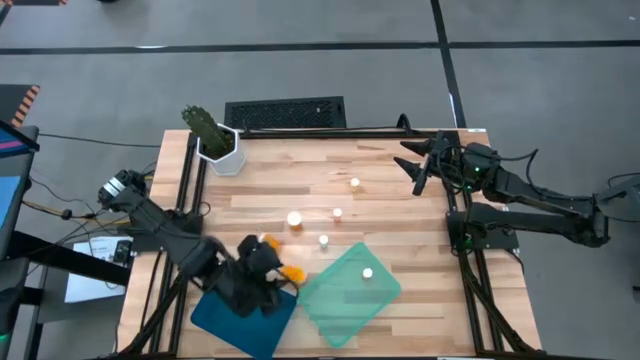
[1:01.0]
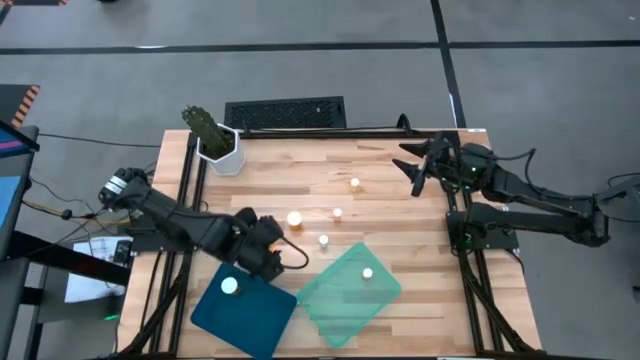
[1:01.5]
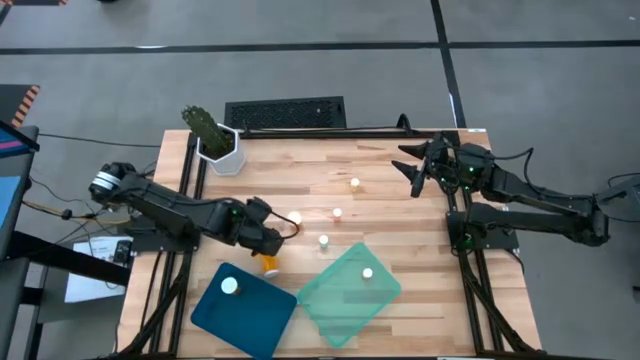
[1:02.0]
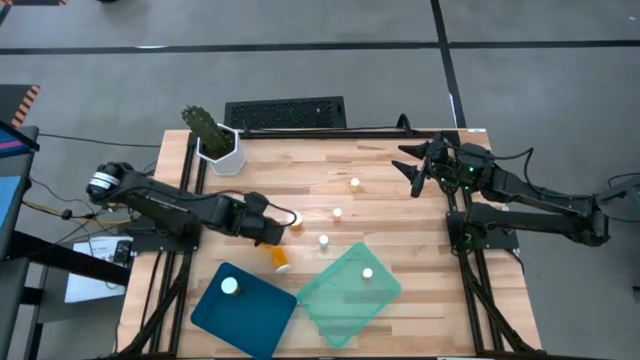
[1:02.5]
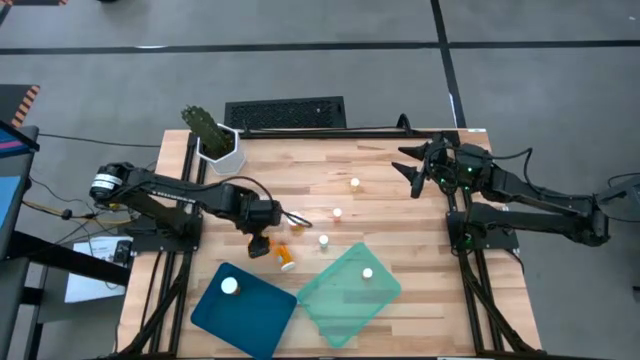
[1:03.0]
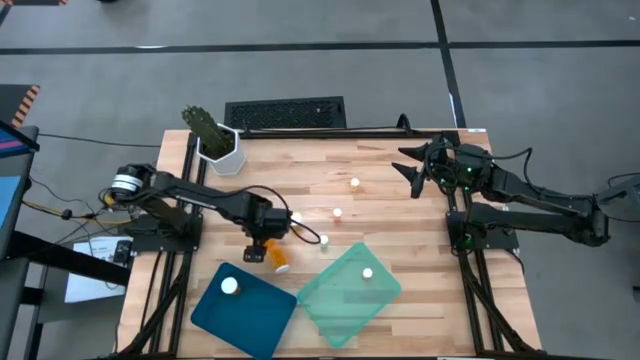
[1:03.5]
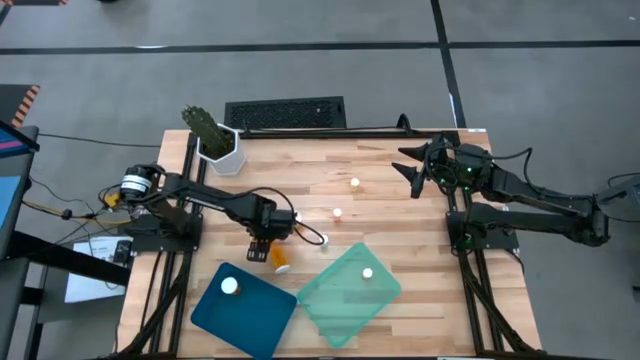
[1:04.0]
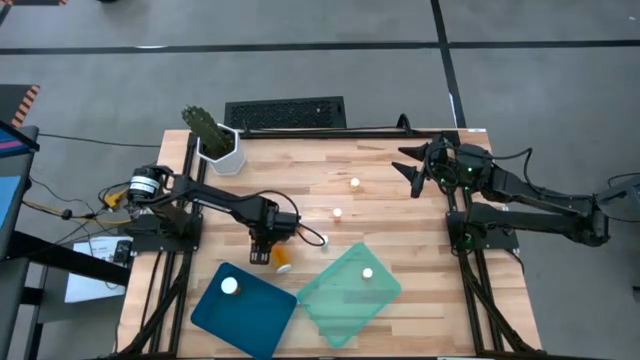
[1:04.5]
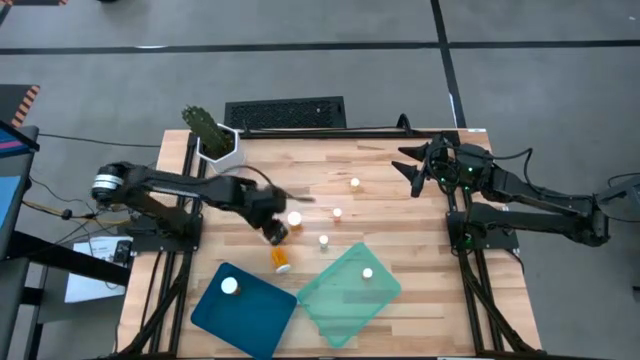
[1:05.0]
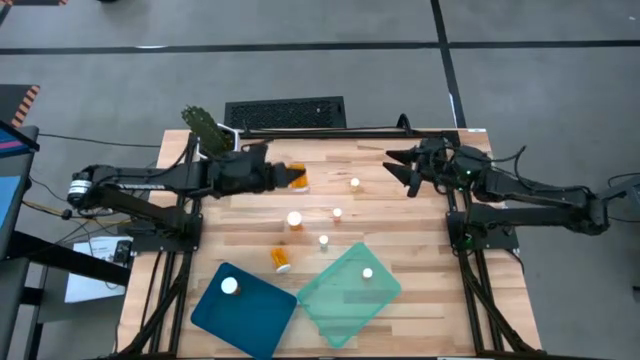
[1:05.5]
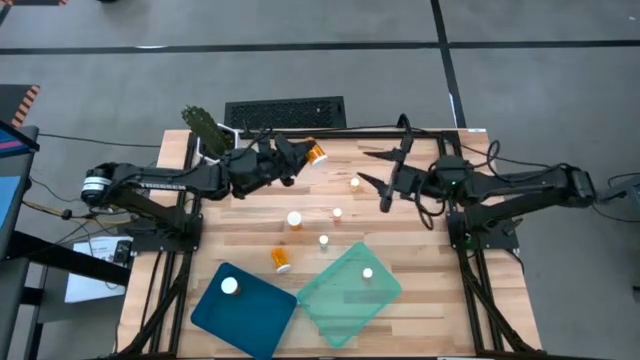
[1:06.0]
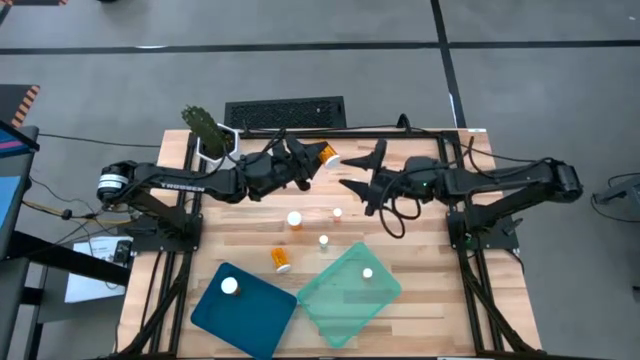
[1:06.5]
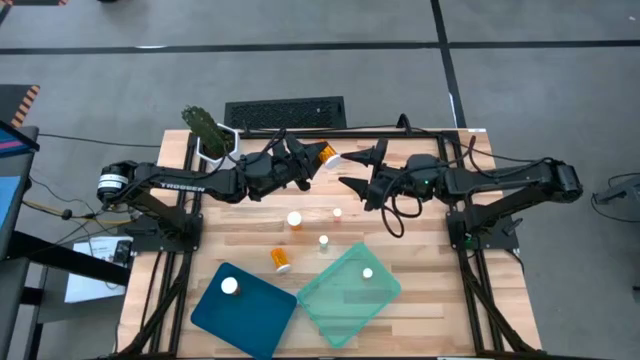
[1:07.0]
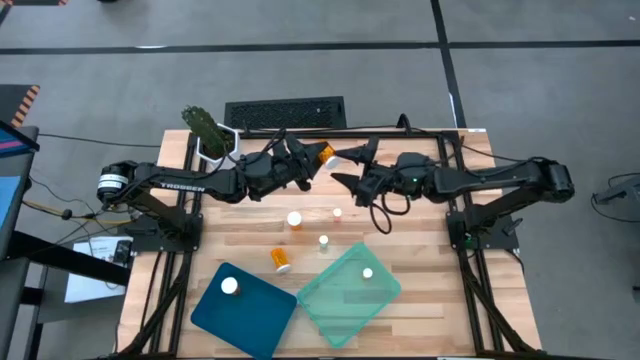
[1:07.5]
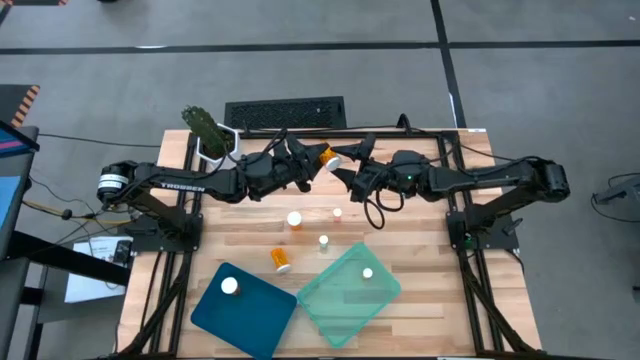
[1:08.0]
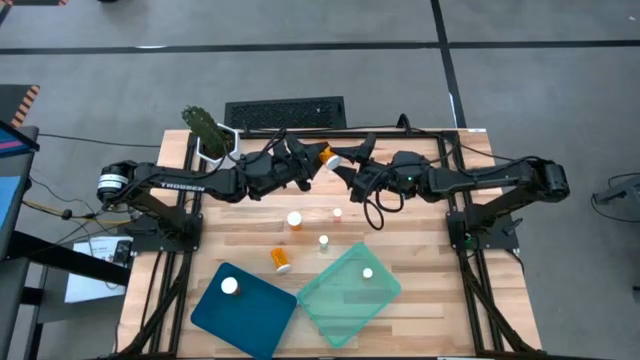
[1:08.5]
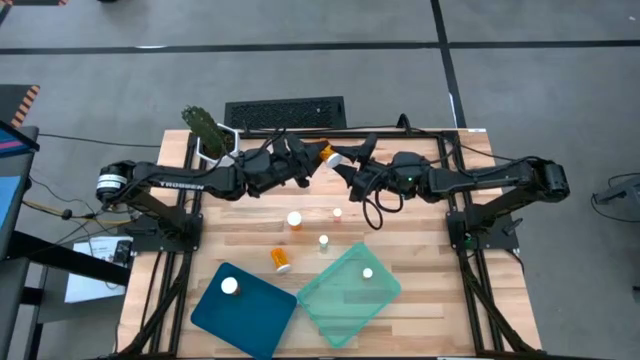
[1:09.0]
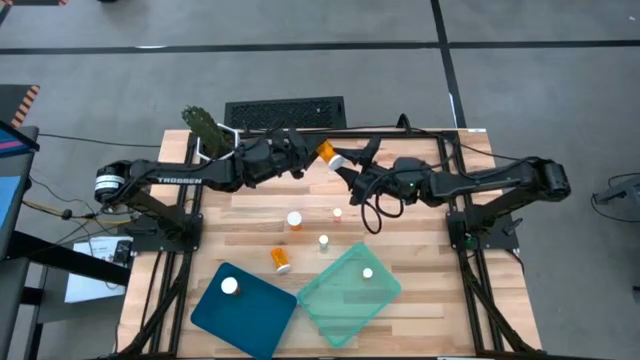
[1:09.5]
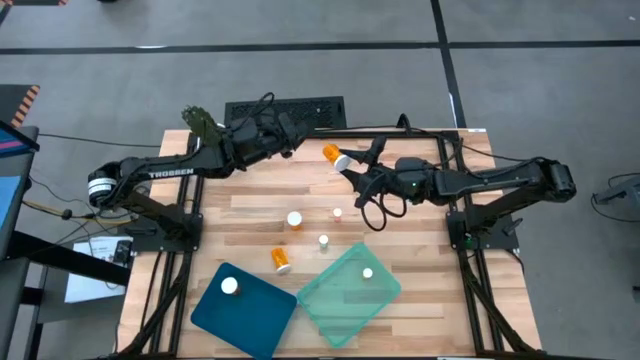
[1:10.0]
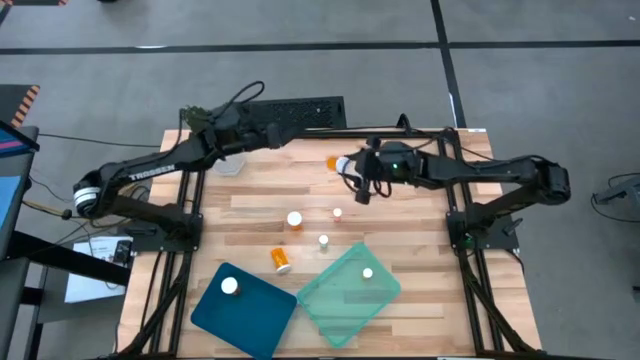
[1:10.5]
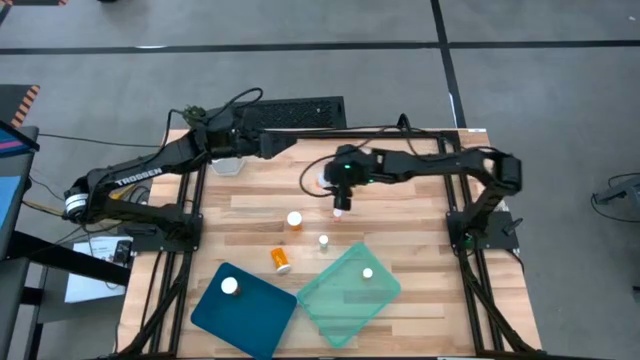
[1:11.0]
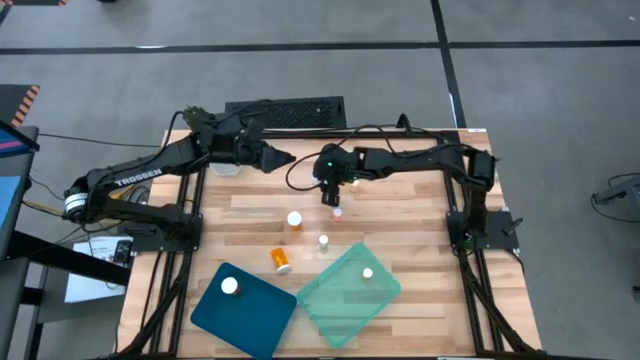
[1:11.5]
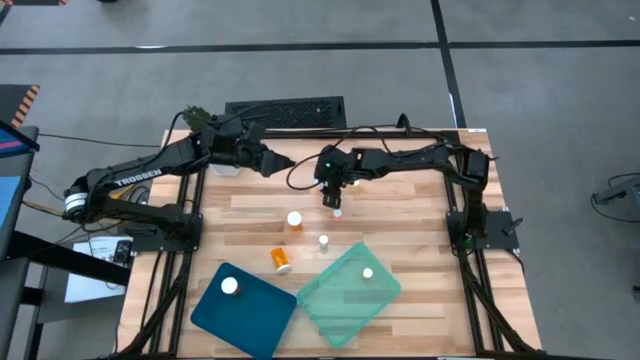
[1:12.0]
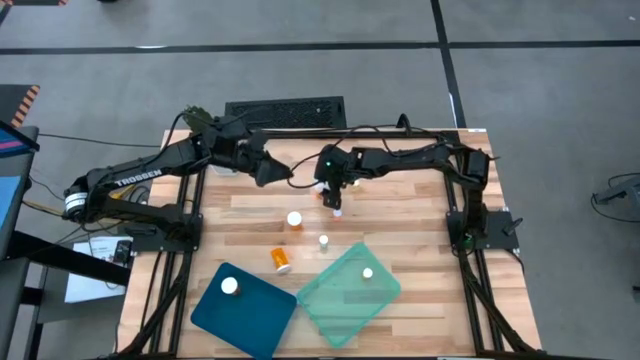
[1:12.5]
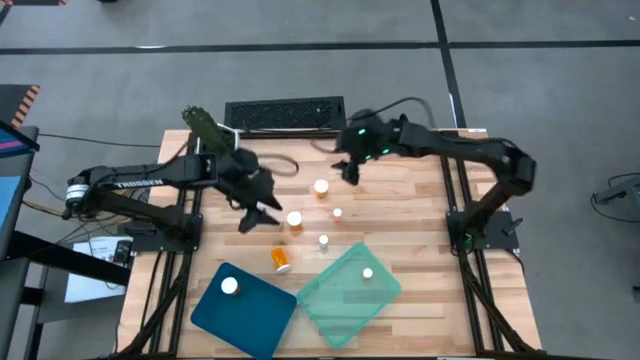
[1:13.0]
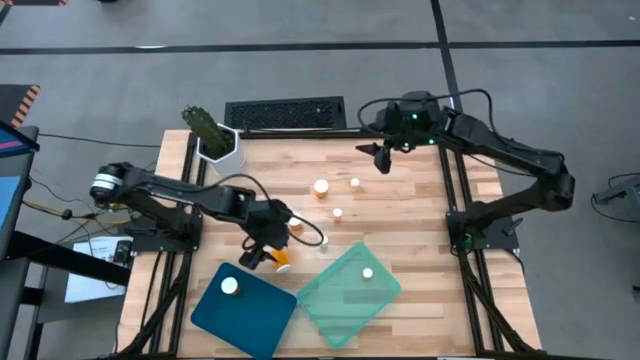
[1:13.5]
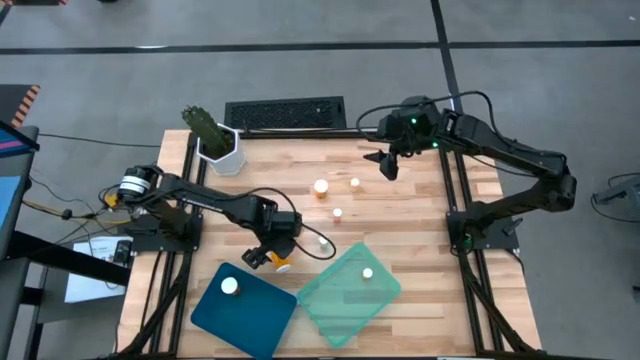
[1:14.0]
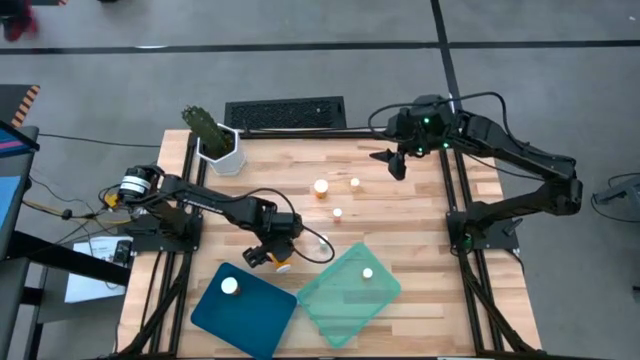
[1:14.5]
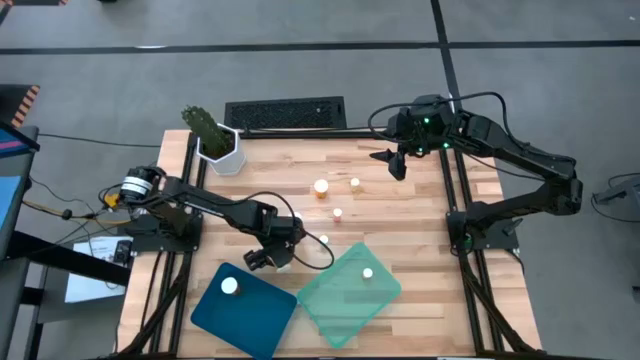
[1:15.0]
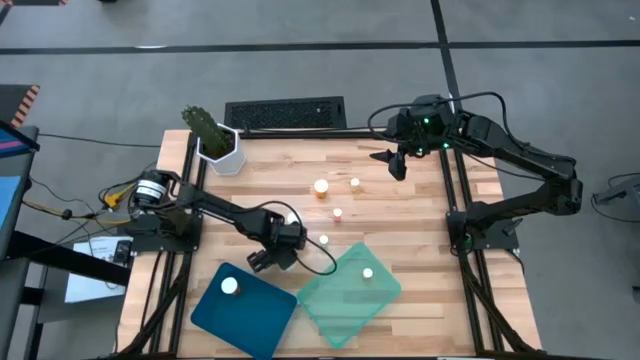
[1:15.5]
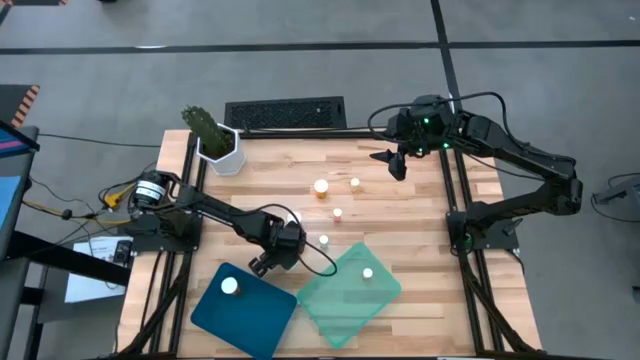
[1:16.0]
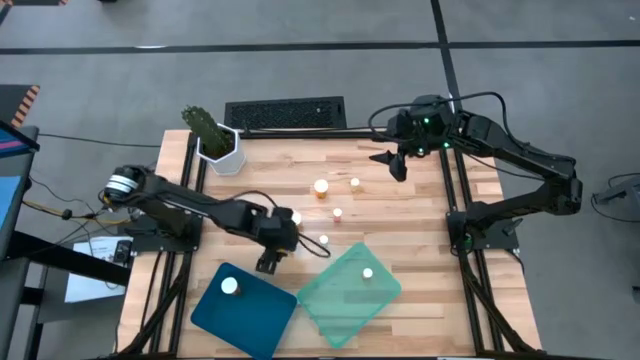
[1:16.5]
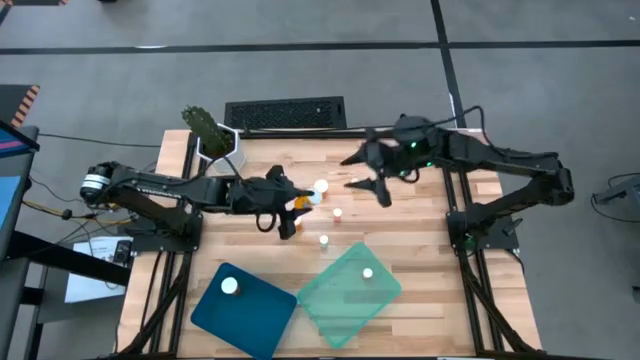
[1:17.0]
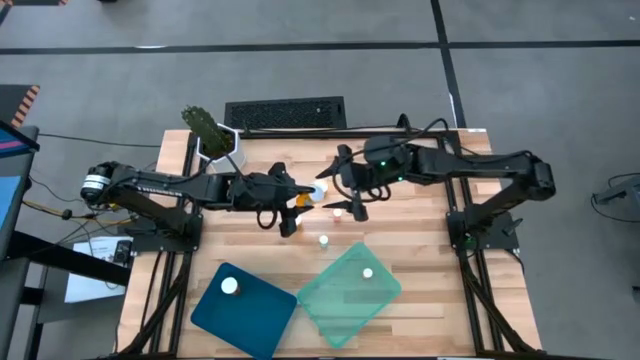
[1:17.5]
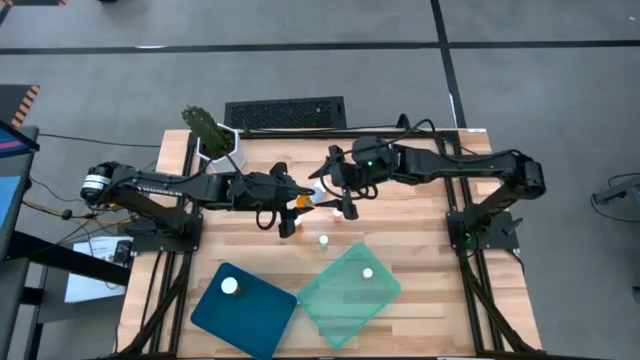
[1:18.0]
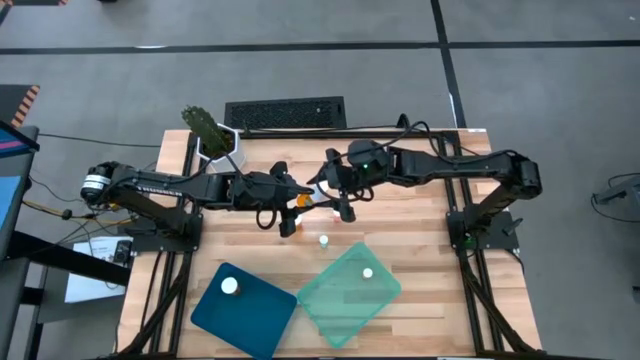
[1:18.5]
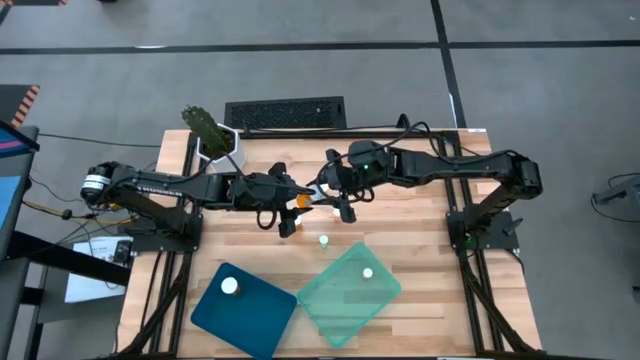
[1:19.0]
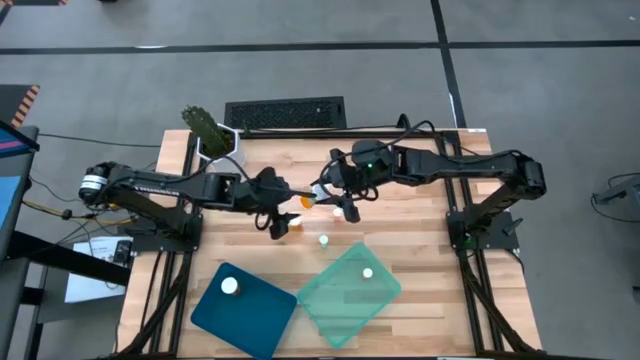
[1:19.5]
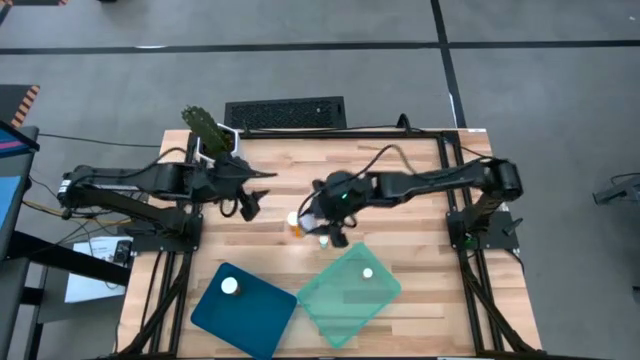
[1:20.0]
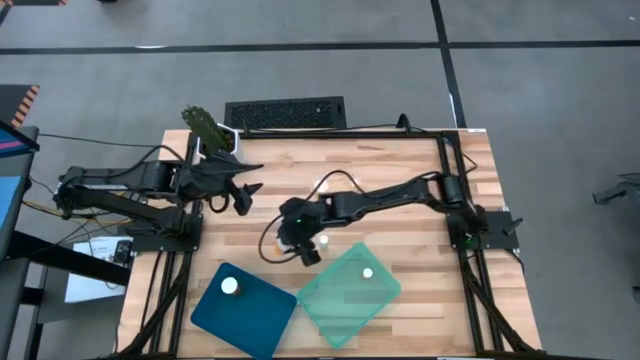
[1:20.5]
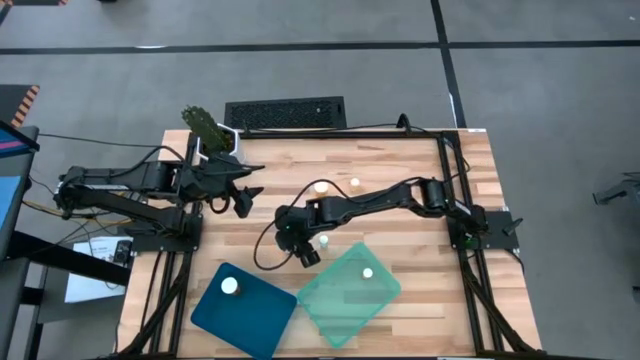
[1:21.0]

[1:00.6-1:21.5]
Task: Pick and place medicine bottles into bin by pill shape (circle, oval)
Adjust the big orange pill bottles
